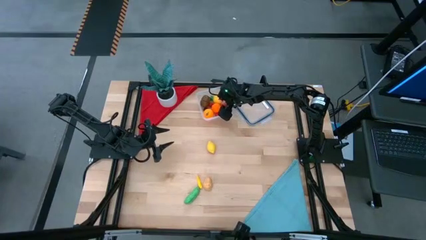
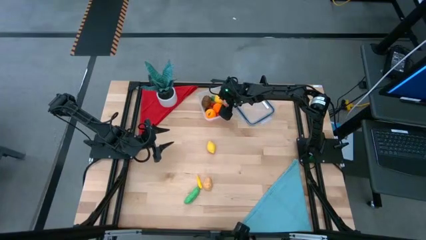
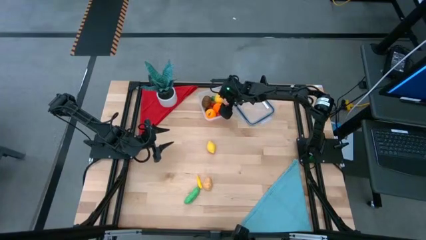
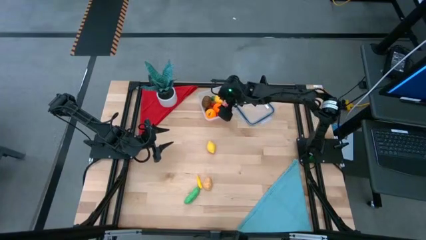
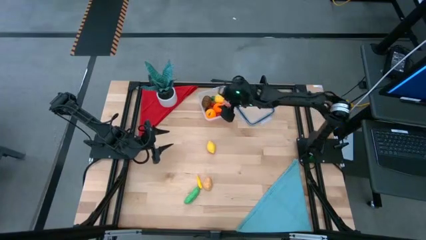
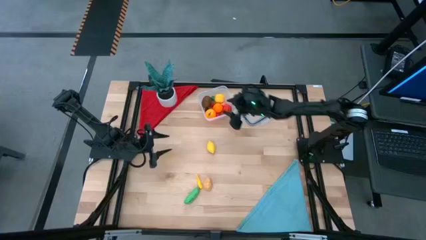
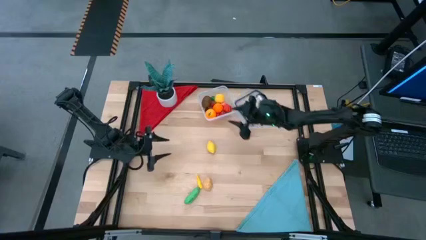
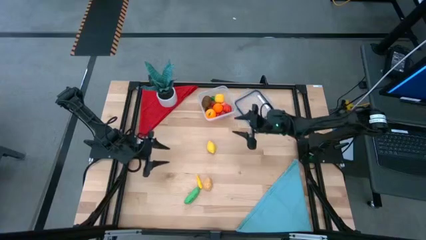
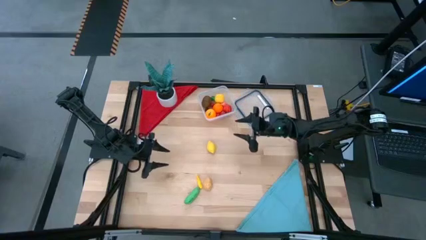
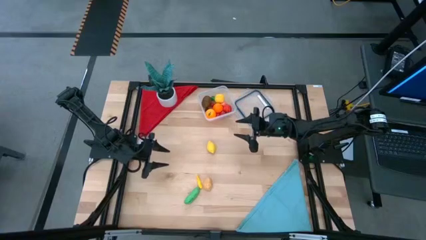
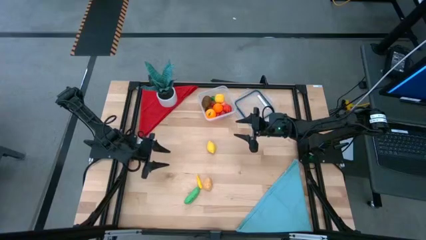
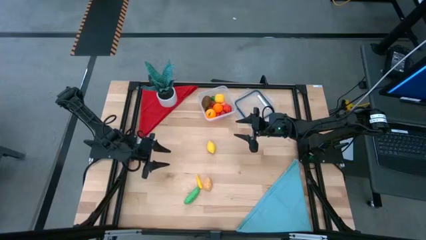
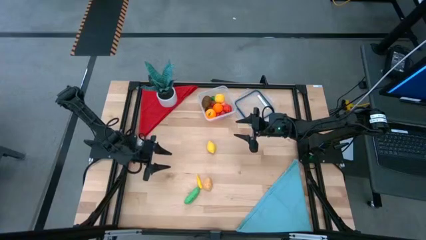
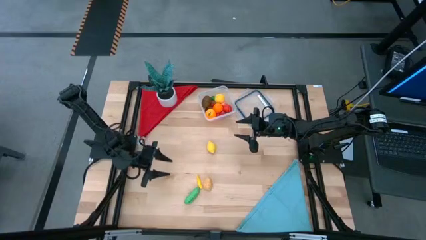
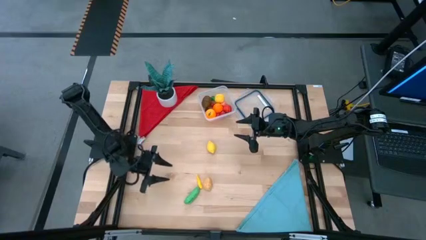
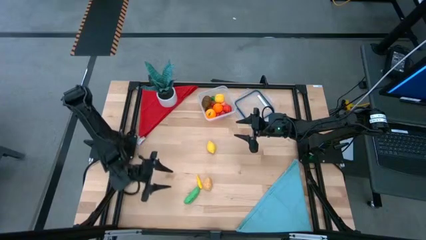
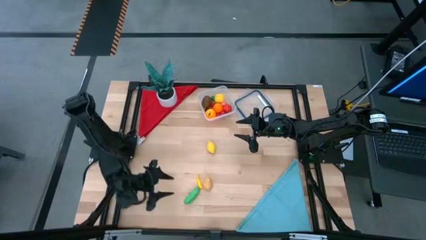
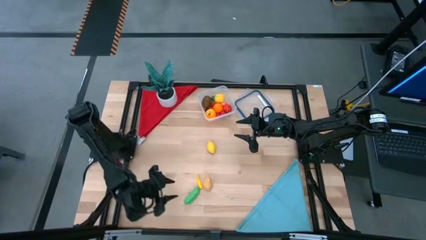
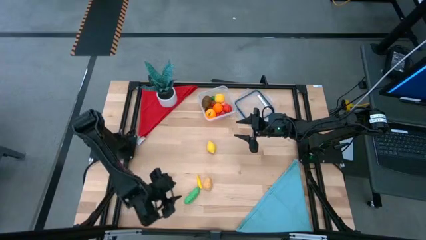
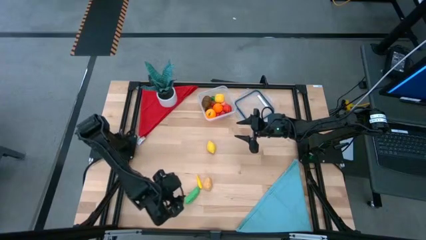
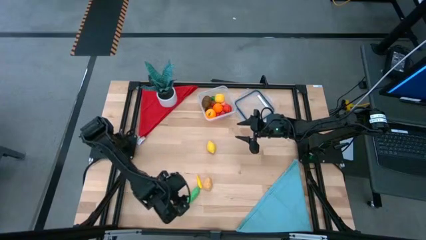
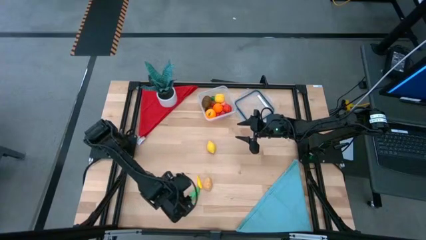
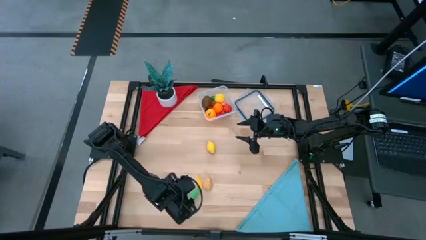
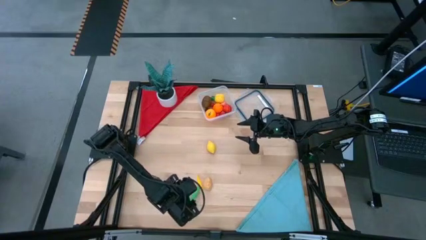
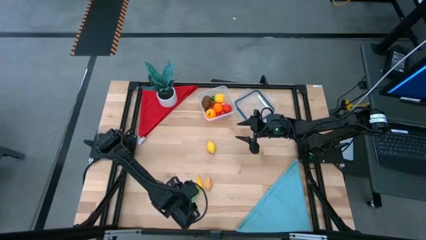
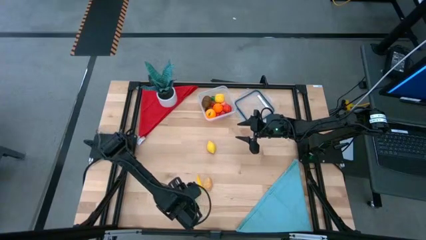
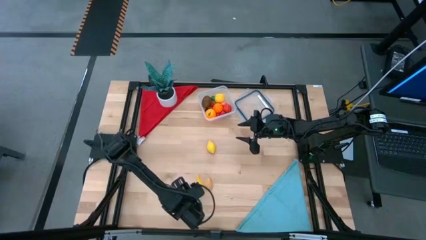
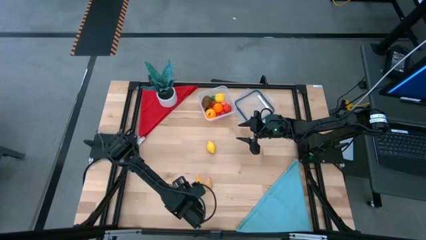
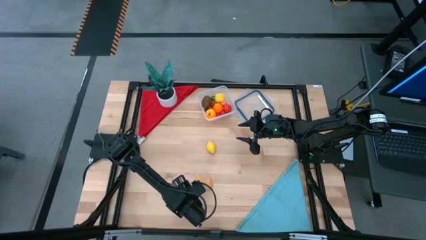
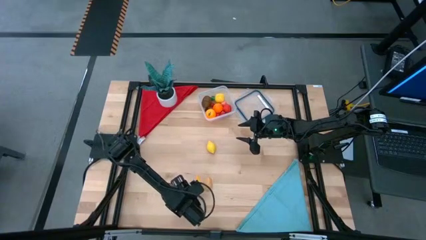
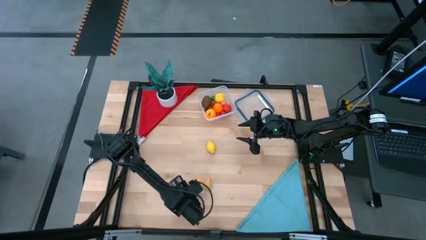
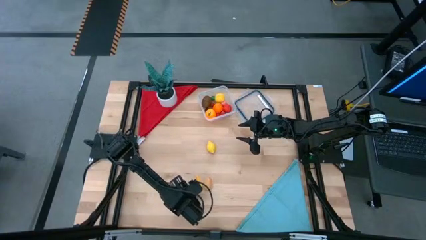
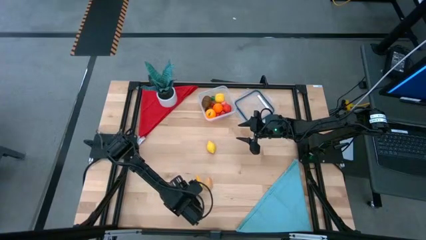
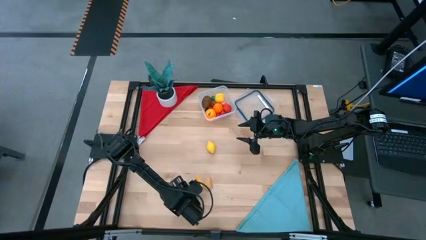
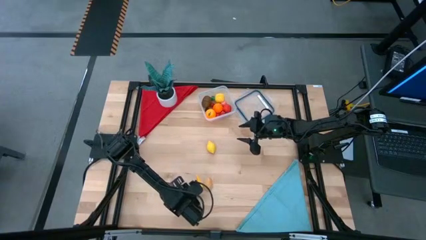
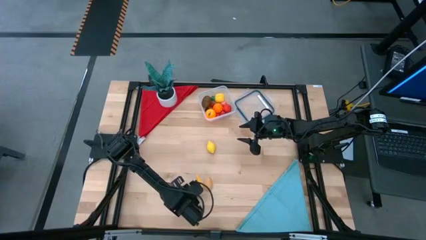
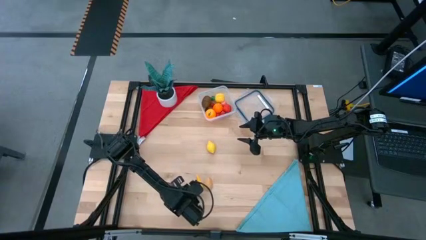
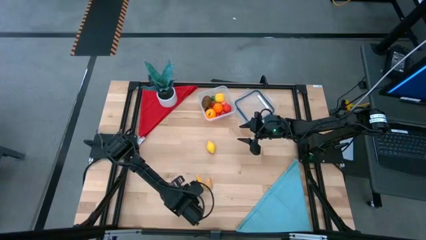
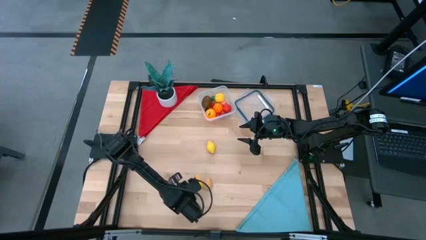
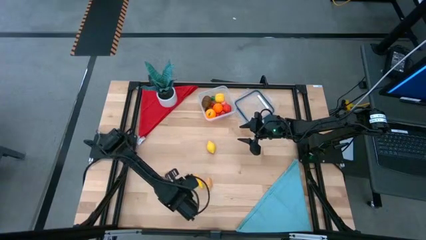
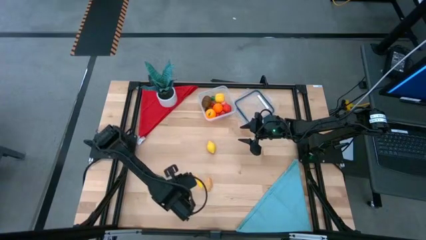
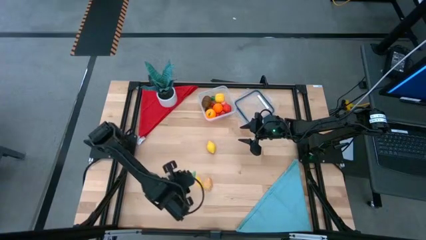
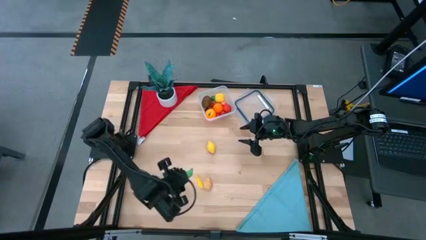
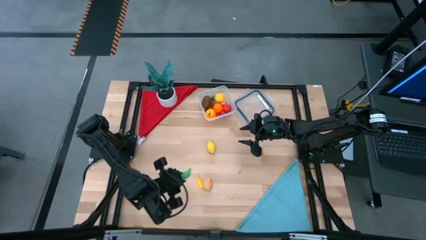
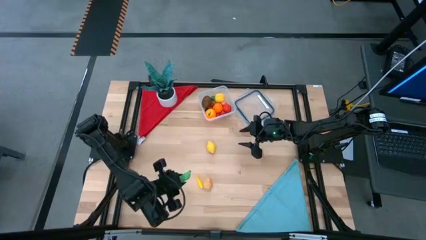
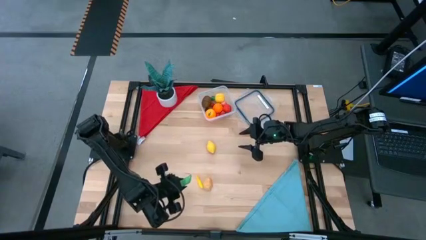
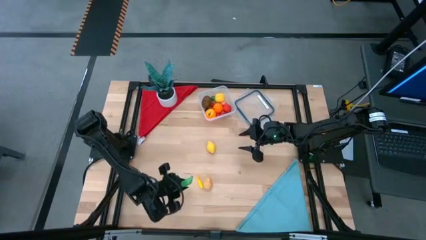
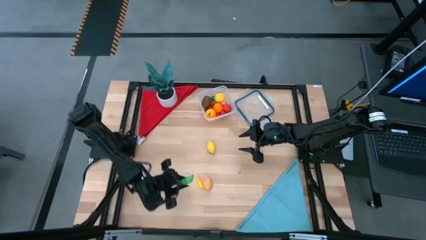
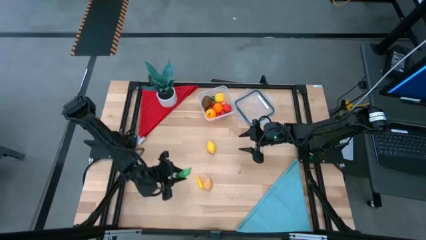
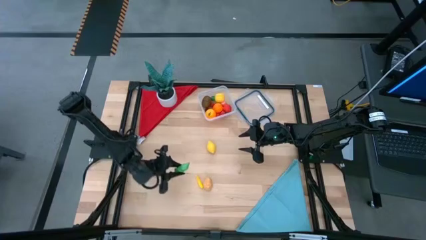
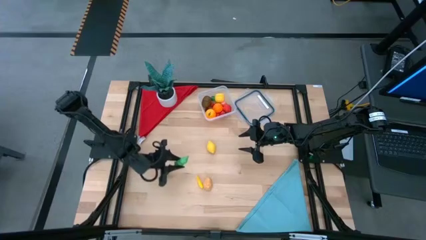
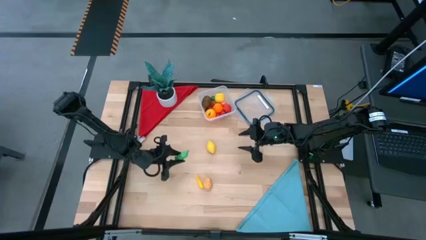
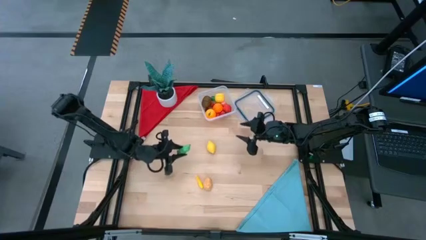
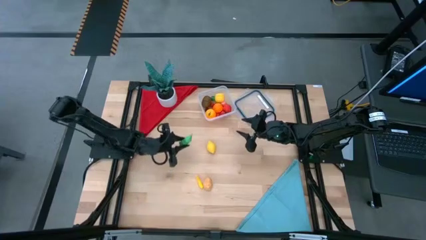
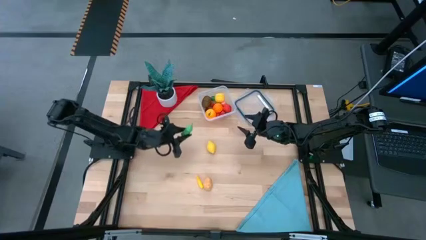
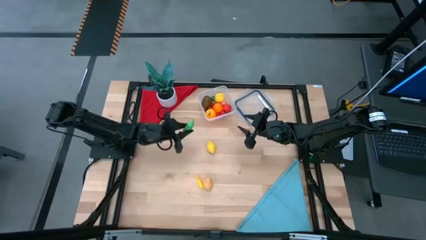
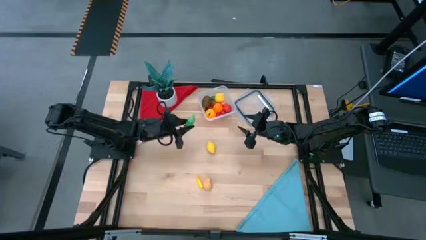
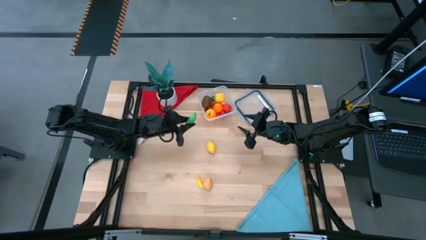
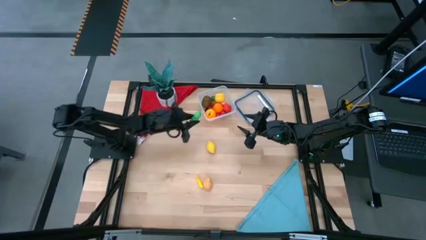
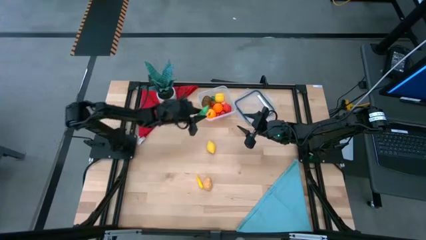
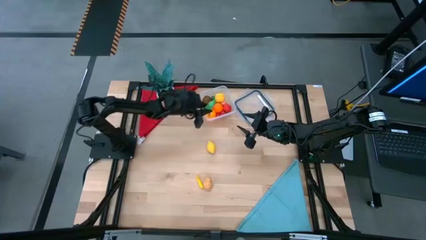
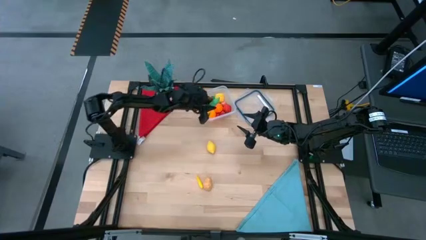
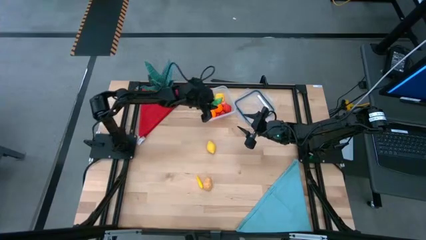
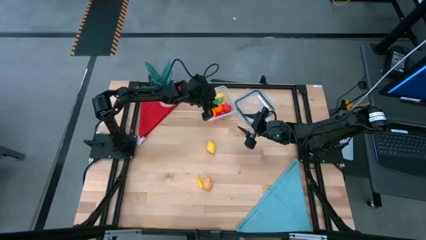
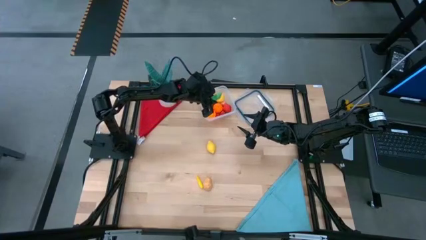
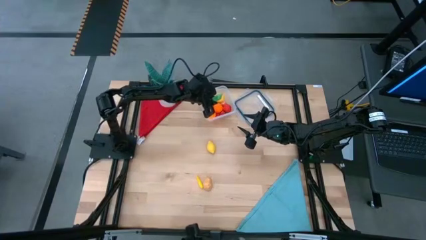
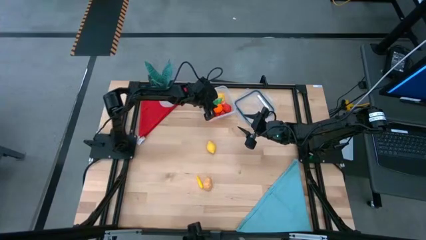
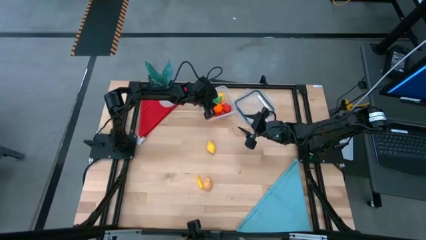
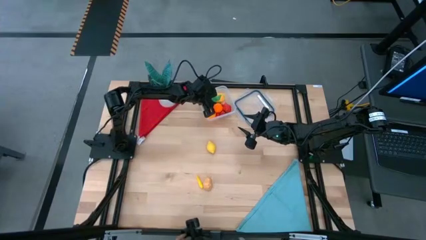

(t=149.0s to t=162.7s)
Task: Pick and placing Produce into tupperware
Put the green pea into the transparent container

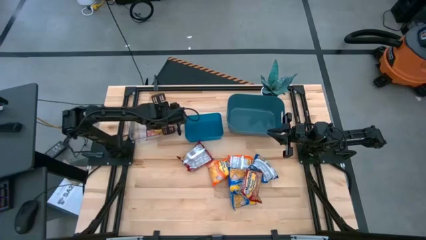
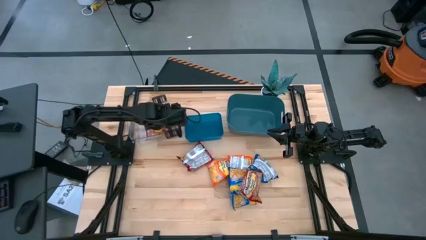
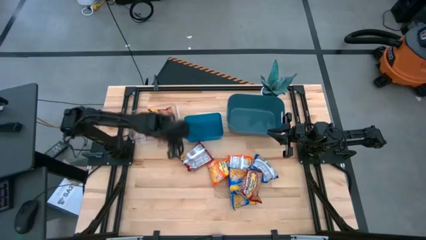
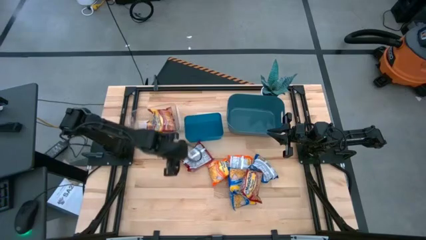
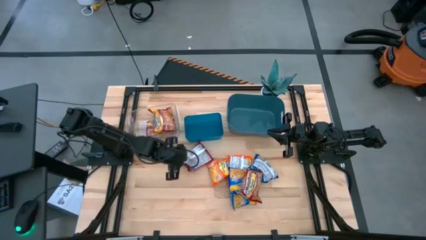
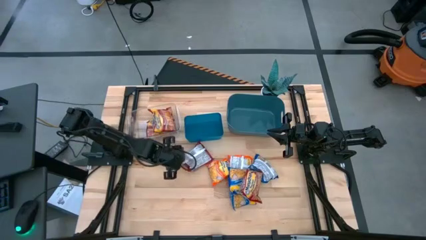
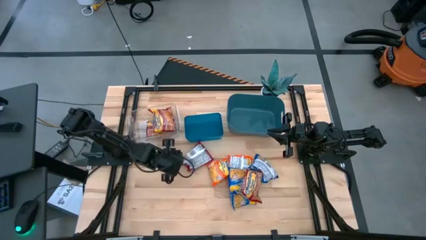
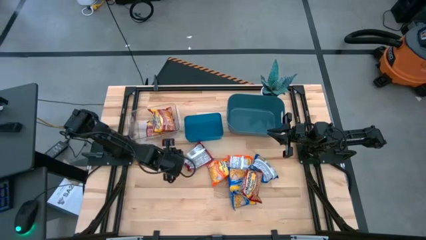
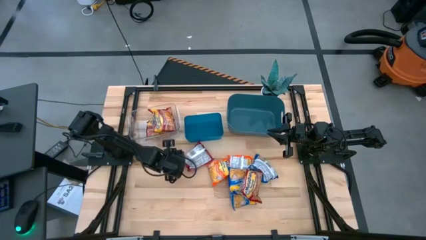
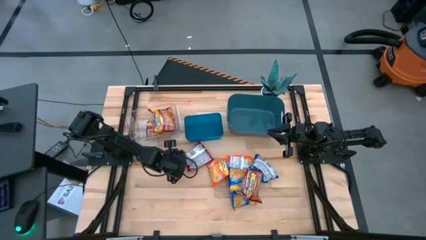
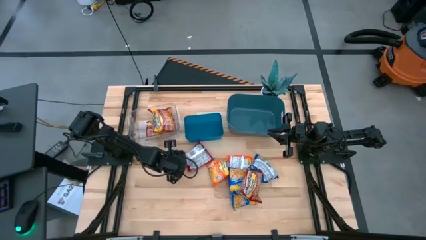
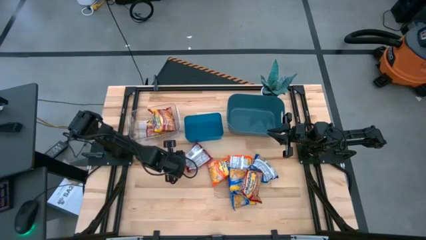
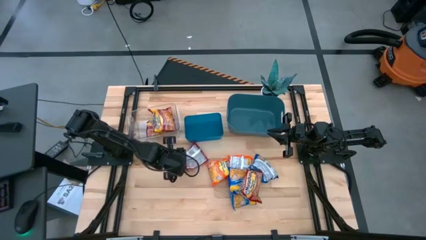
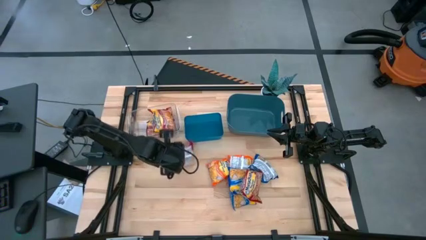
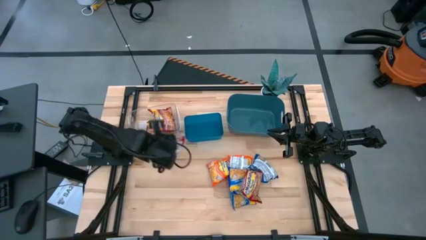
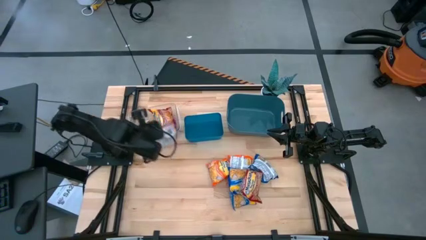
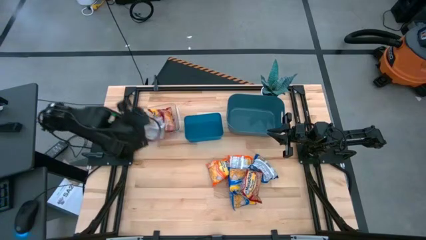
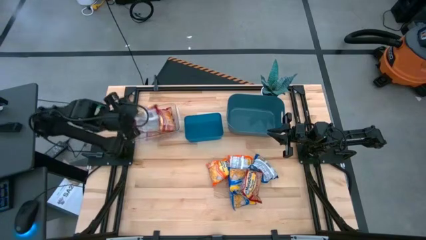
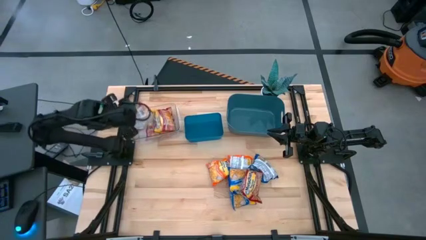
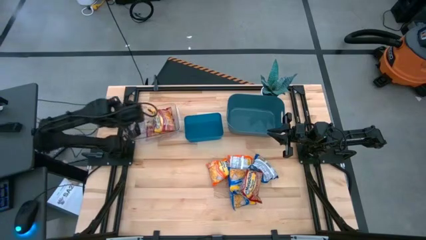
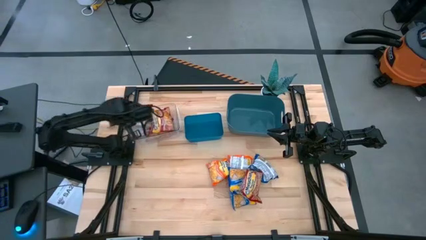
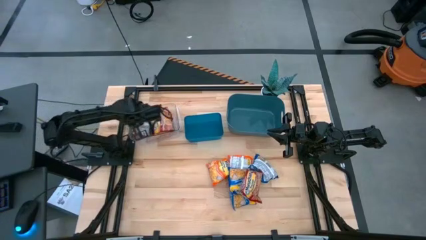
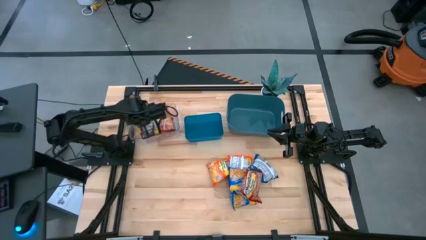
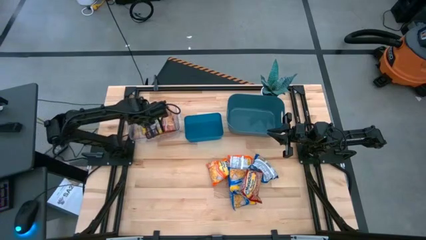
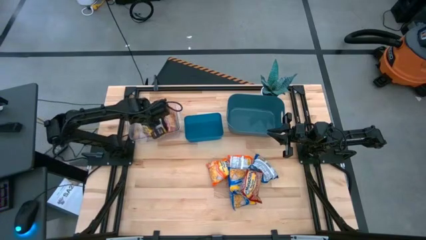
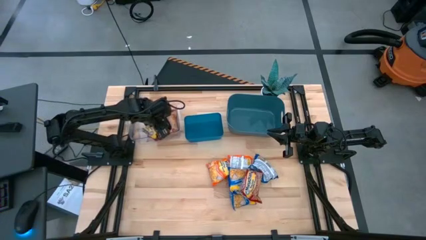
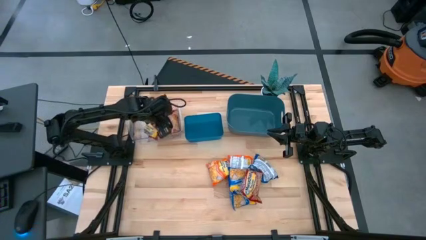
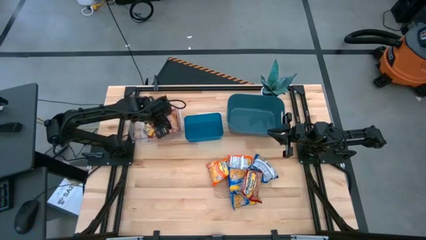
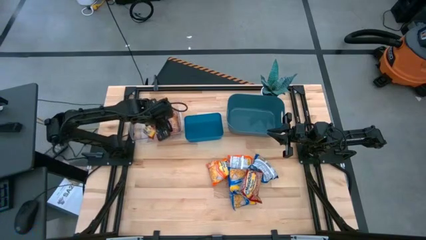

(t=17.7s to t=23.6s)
Task: Sort Maruchan noodles
Put the red noodle pack into the transparent bin
